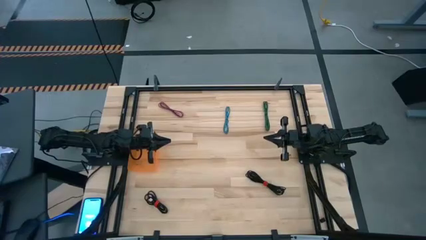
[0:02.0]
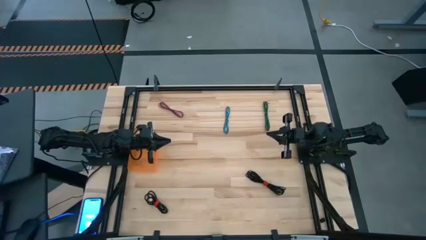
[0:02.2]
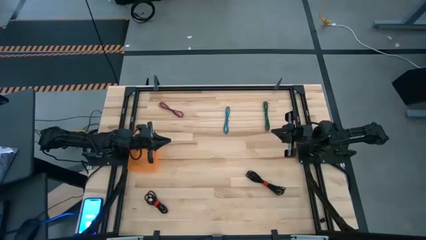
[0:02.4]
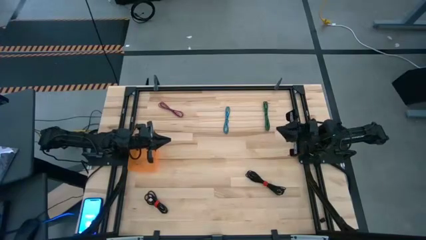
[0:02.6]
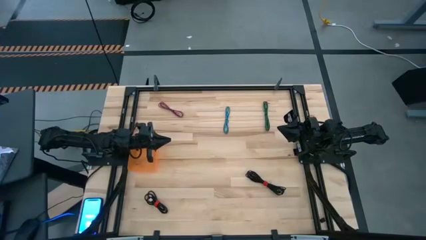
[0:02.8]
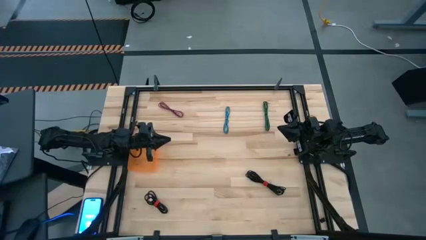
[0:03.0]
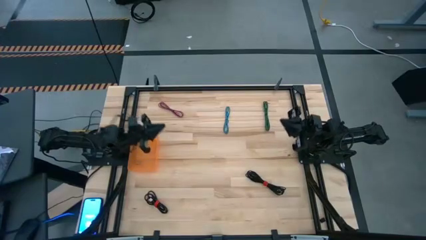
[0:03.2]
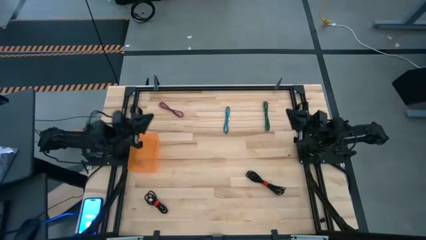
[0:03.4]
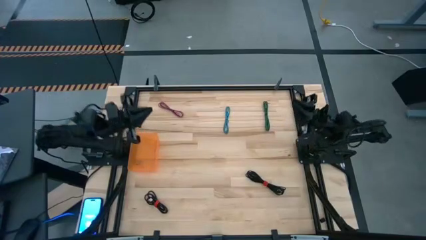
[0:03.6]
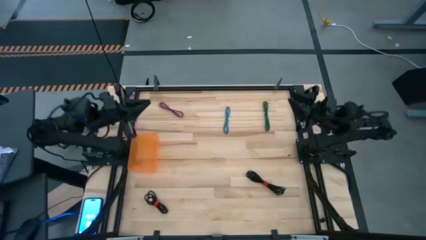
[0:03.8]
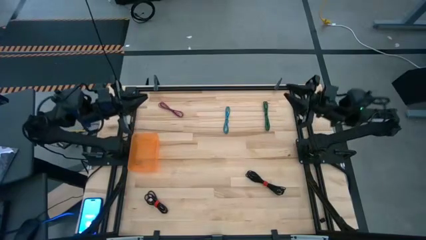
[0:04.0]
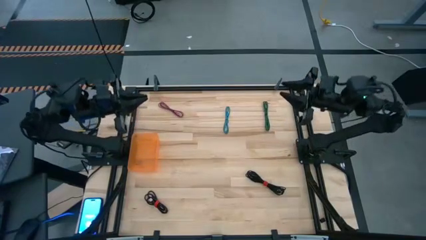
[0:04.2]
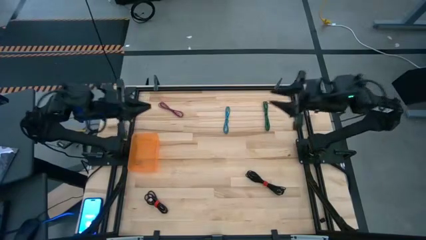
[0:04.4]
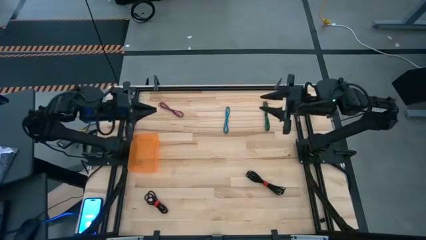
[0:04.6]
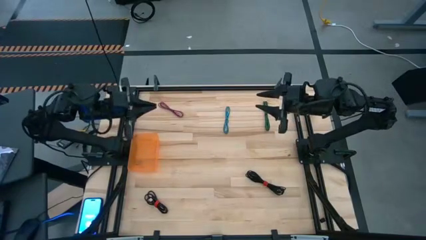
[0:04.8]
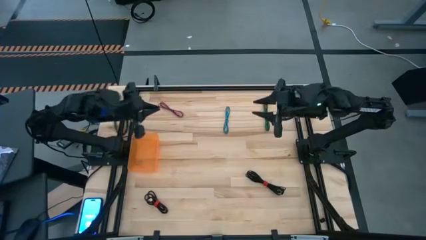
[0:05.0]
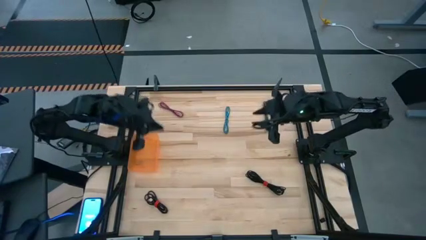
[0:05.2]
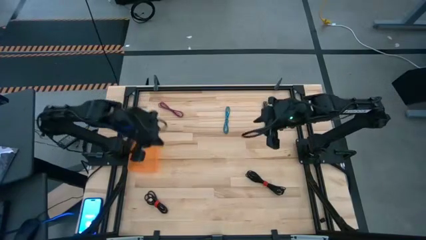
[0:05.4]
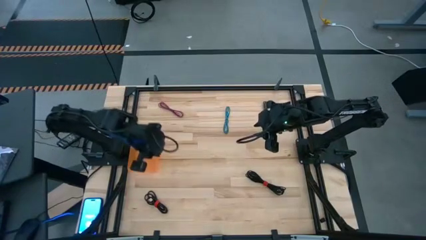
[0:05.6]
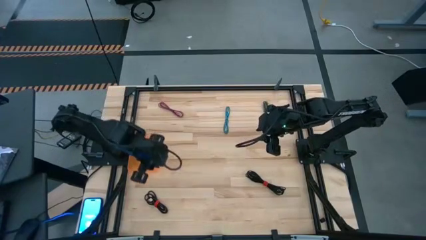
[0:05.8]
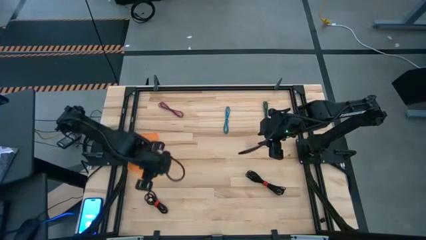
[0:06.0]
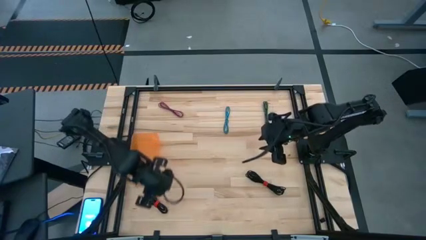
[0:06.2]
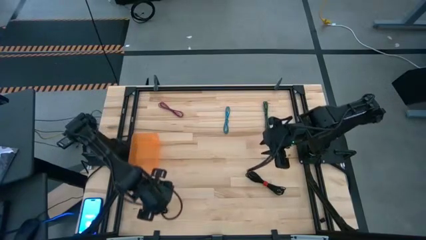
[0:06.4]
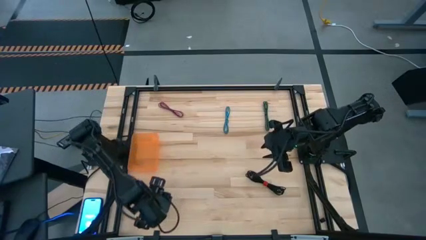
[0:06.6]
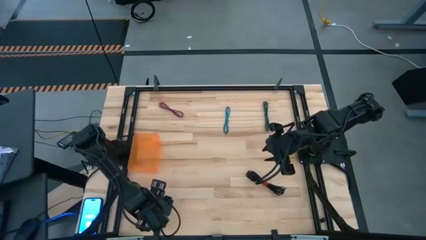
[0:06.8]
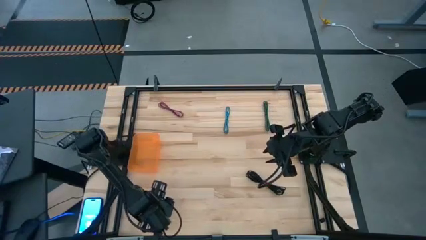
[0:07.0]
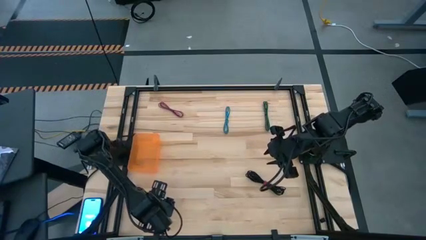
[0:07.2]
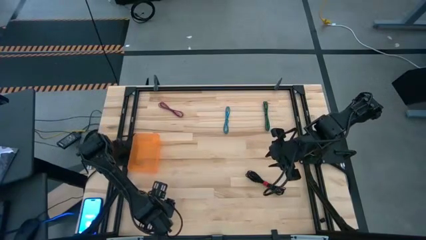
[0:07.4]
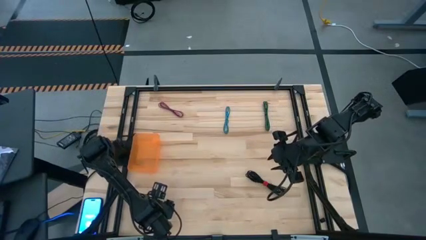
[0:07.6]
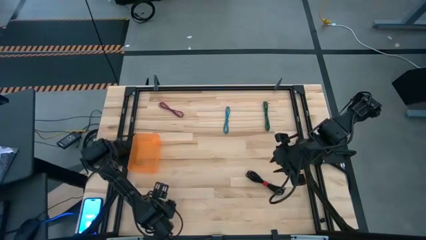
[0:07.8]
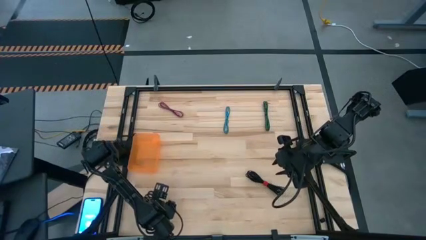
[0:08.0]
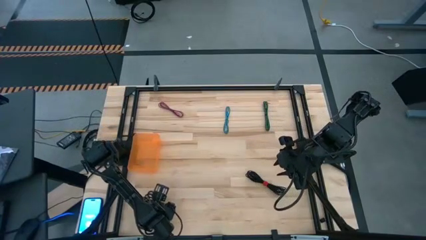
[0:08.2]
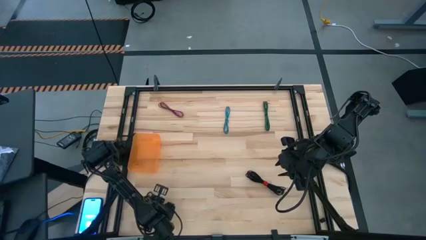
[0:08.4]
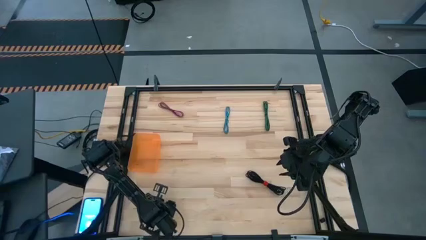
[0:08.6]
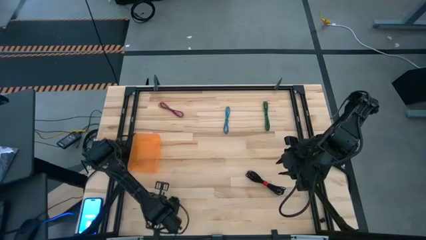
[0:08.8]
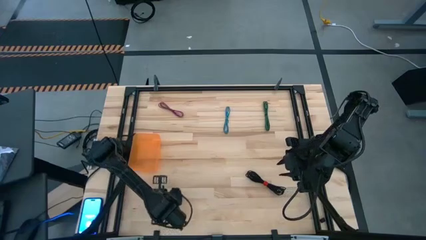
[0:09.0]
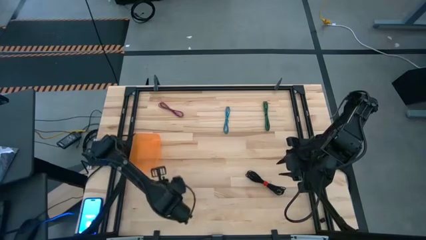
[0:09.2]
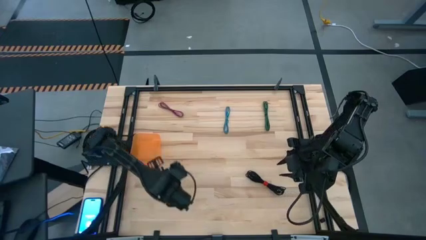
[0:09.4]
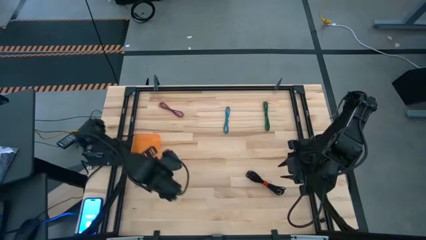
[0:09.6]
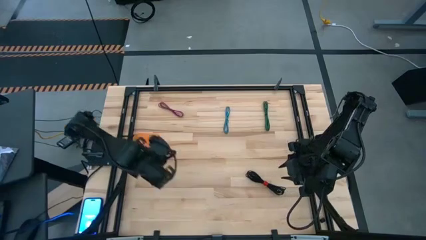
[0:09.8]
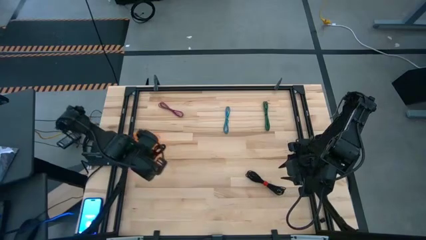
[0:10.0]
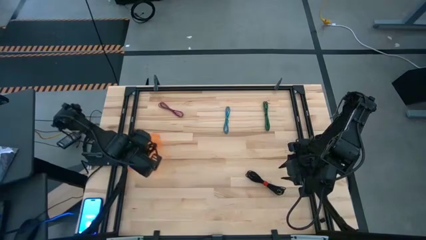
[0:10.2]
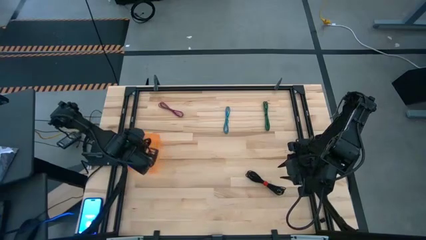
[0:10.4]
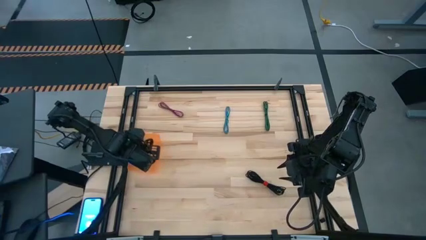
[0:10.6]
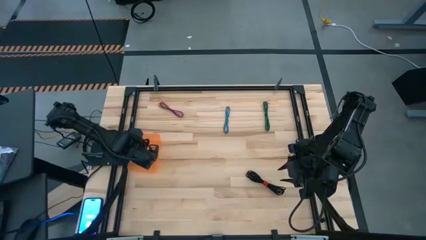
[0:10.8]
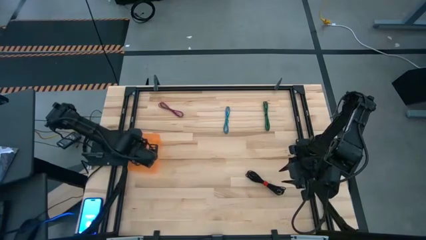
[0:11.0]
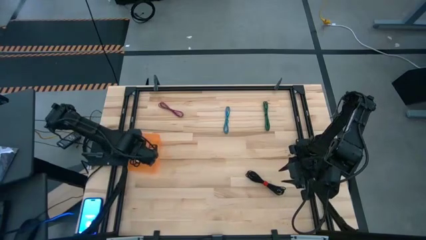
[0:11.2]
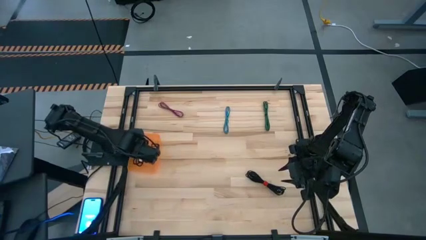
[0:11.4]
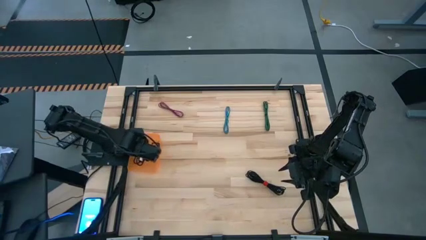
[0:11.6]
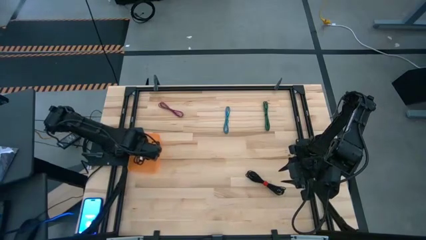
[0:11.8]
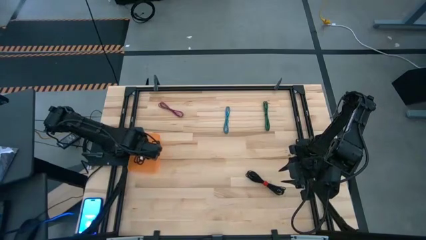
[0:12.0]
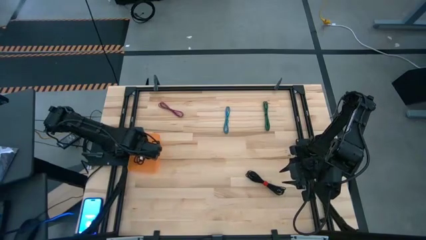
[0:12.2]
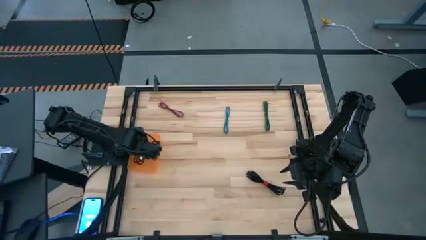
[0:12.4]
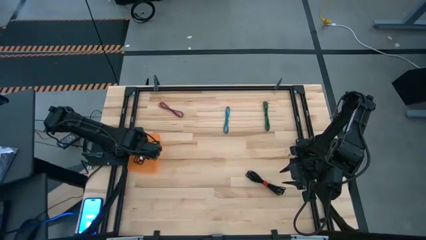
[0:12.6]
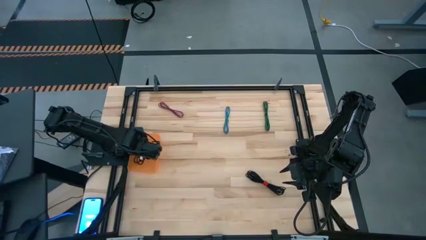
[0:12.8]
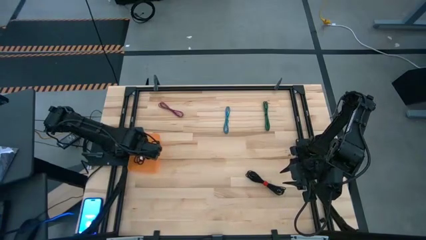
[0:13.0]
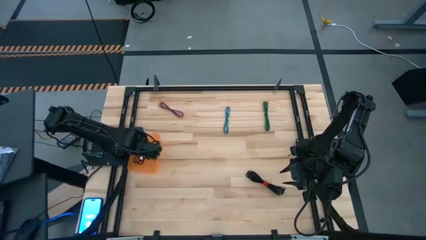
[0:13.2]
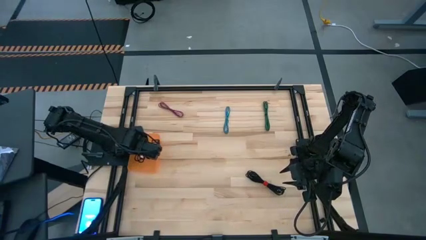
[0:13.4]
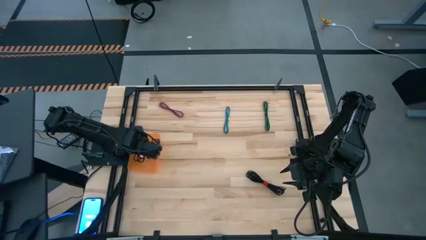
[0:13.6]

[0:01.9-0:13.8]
Task: Pick and place USB-C Cables
Put the left black USB cable into the orange bin
